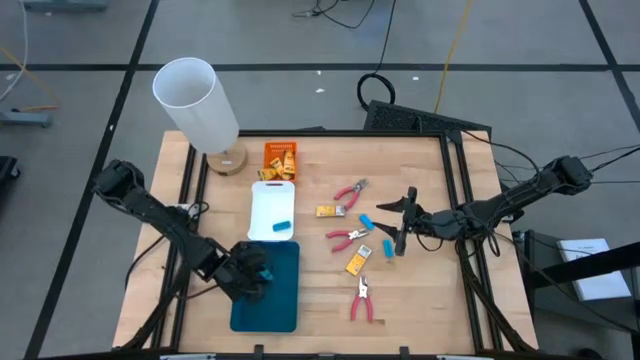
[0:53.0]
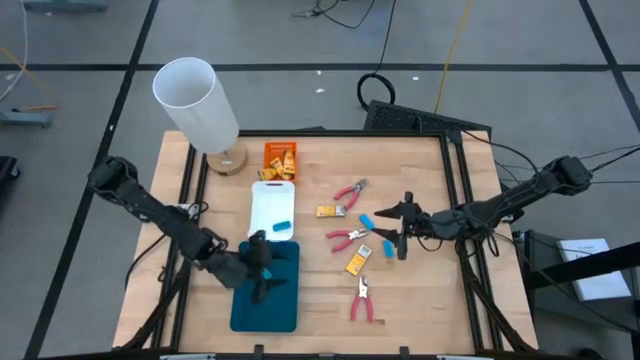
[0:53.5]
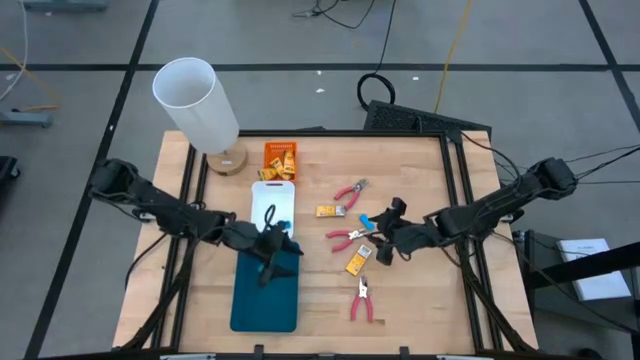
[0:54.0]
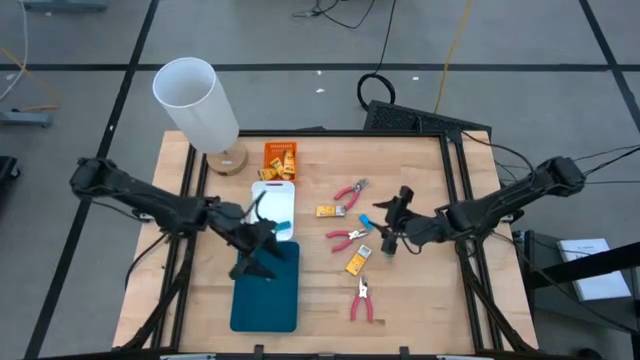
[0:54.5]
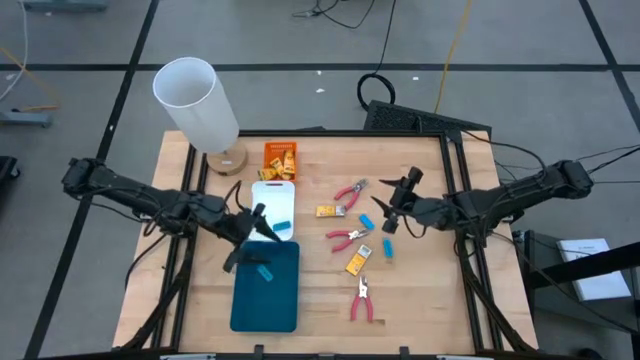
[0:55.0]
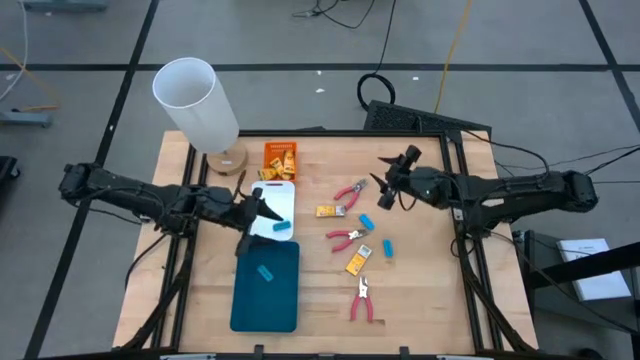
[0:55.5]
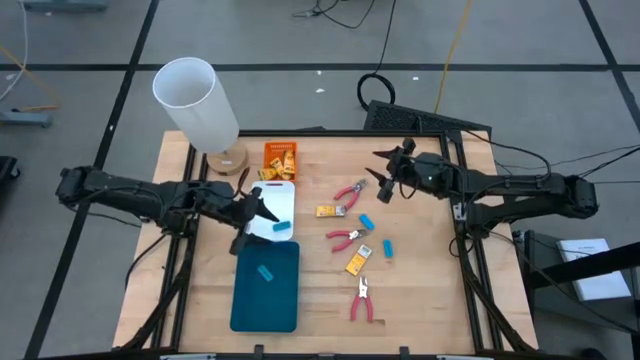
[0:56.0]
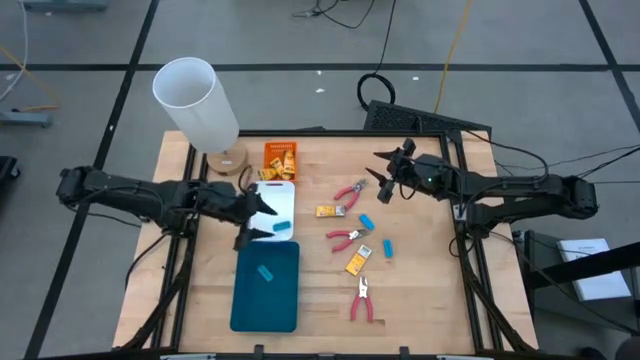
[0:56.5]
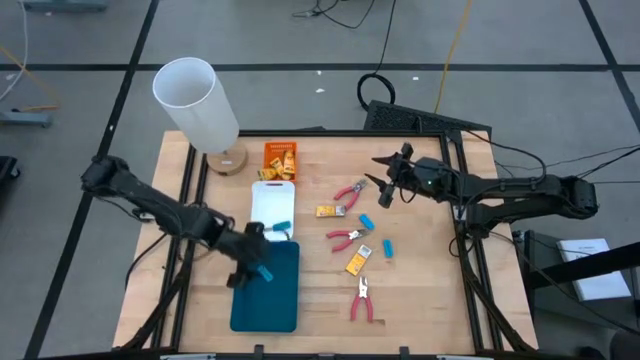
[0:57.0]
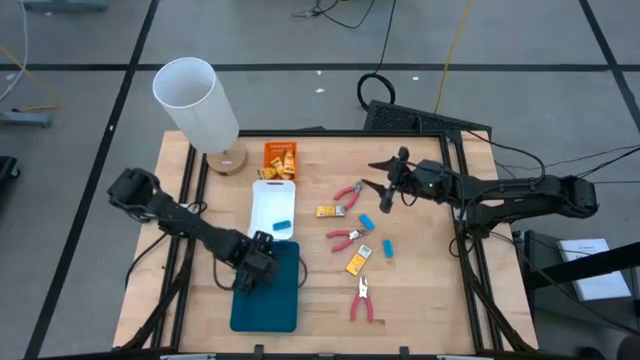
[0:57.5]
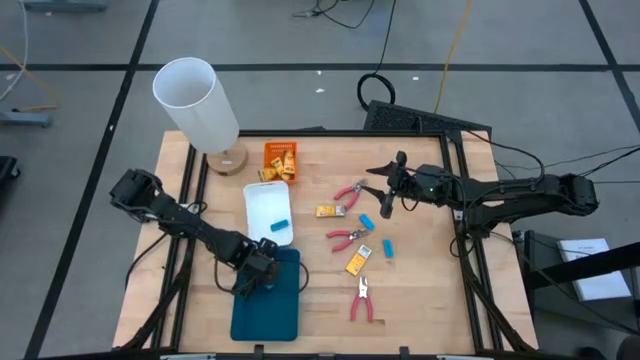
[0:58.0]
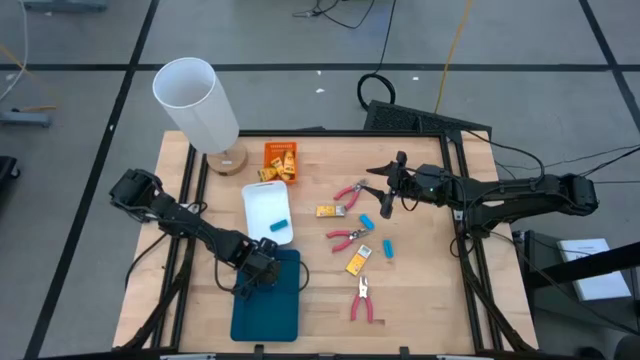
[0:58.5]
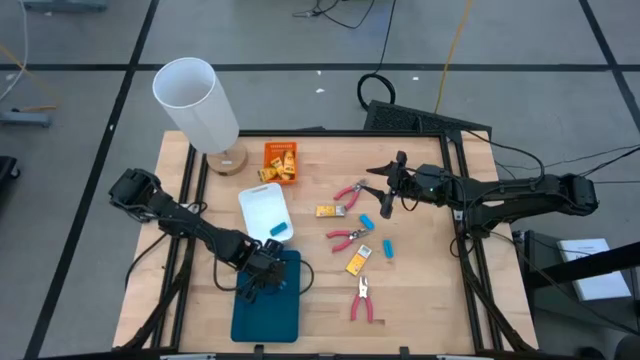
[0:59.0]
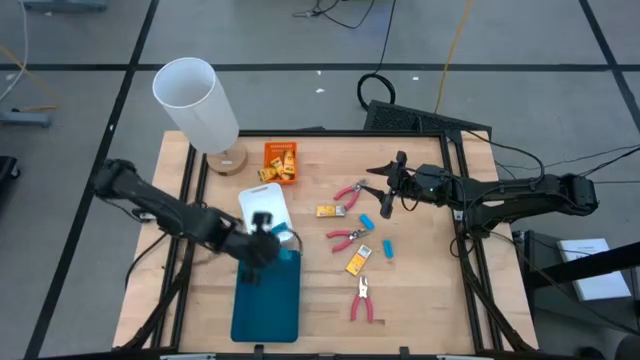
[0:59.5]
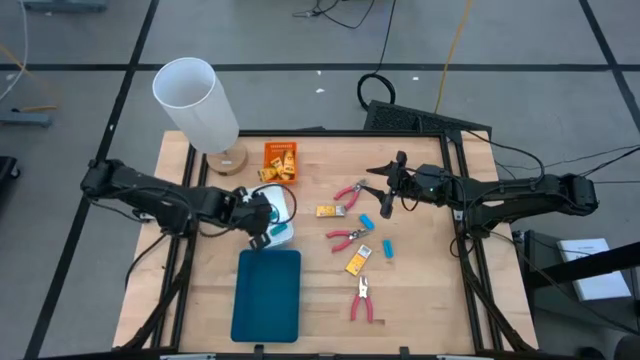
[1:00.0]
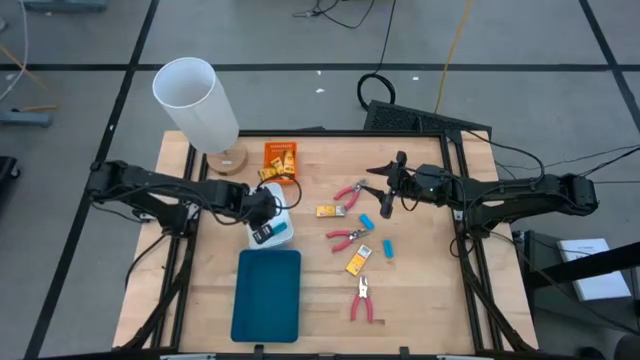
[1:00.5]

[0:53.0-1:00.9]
Task: Pick & Place School Supplies
Put the blue eraser into the white bin

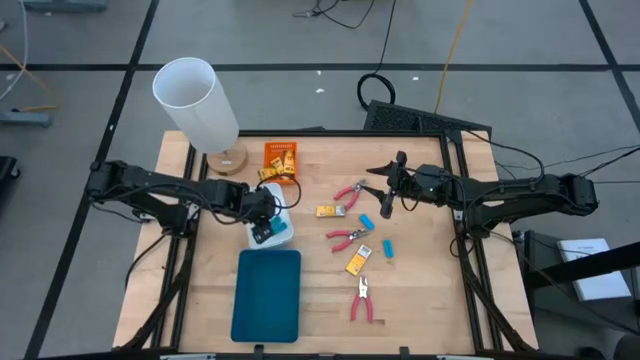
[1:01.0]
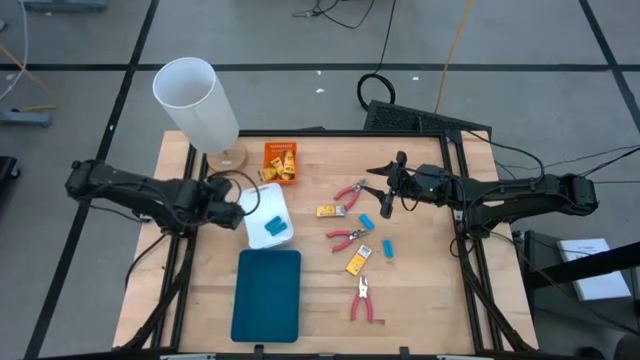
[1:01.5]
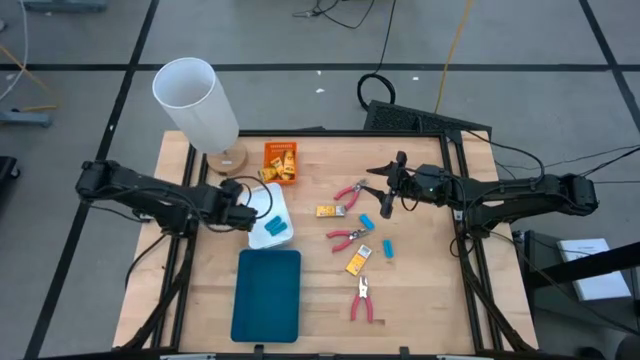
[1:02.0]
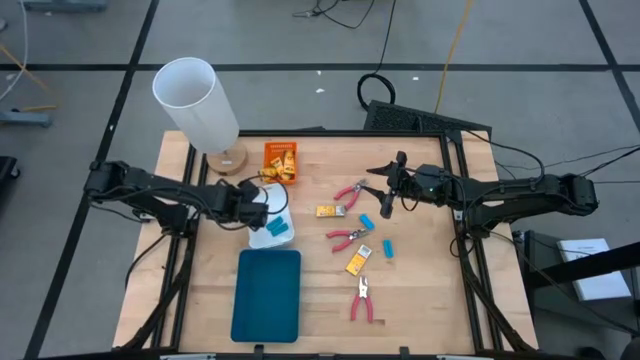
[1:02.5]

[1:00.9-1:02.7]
Adjust the white bin

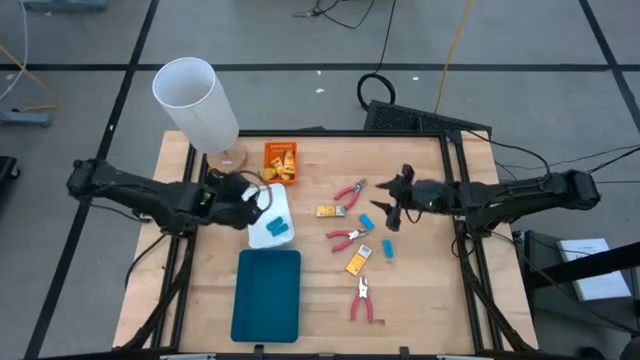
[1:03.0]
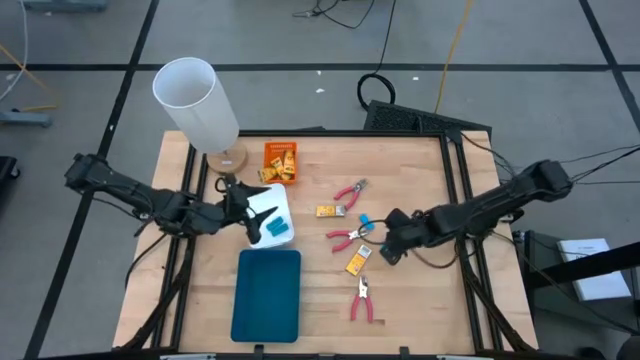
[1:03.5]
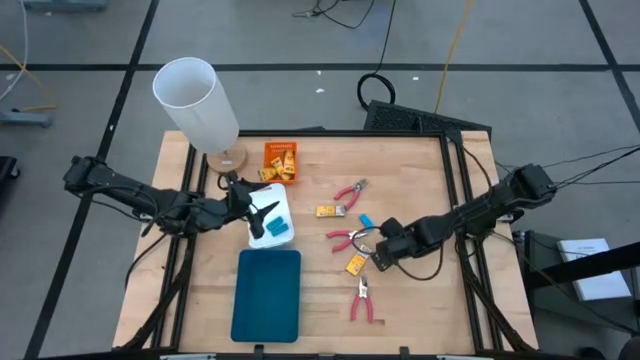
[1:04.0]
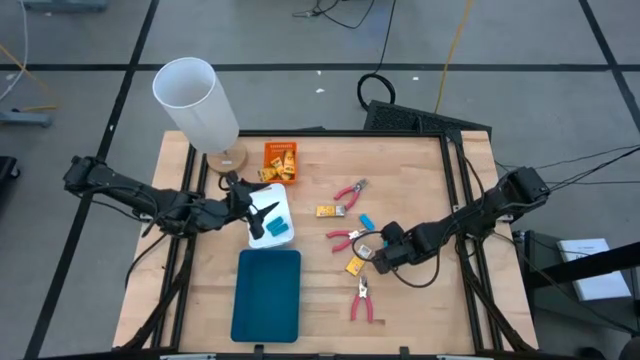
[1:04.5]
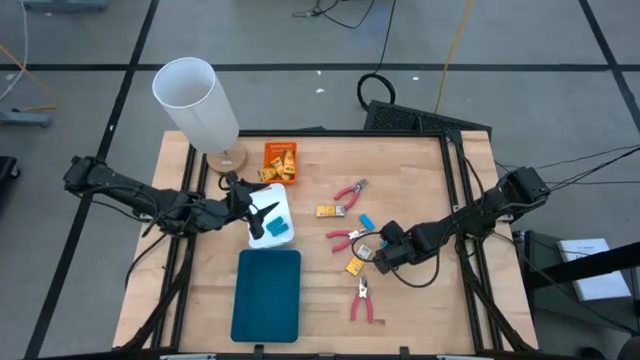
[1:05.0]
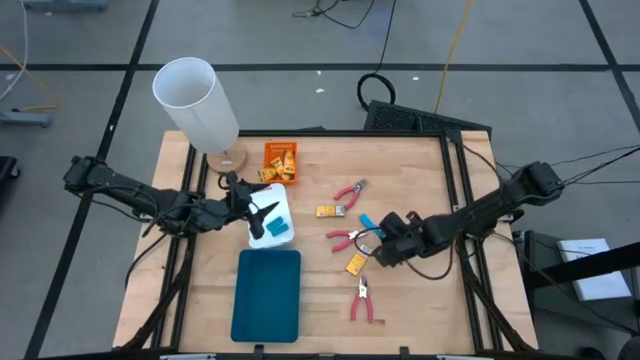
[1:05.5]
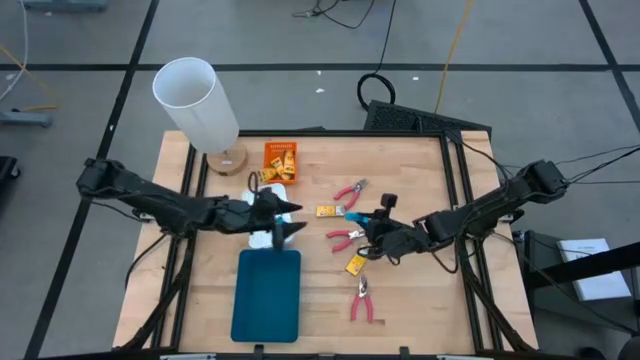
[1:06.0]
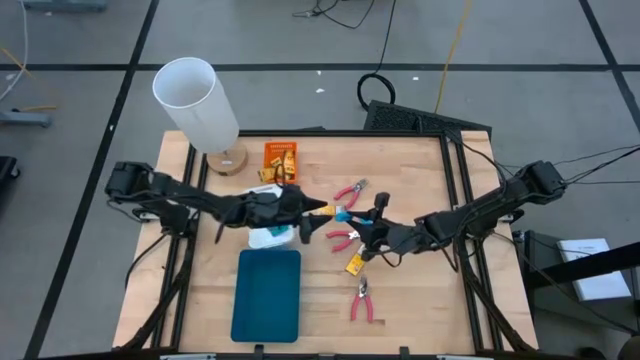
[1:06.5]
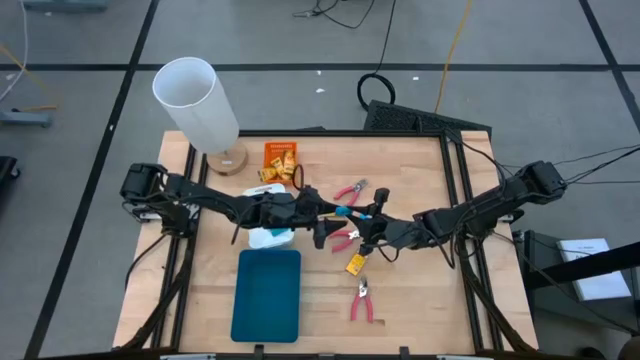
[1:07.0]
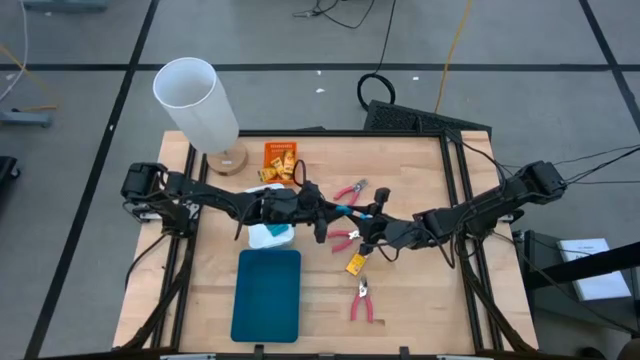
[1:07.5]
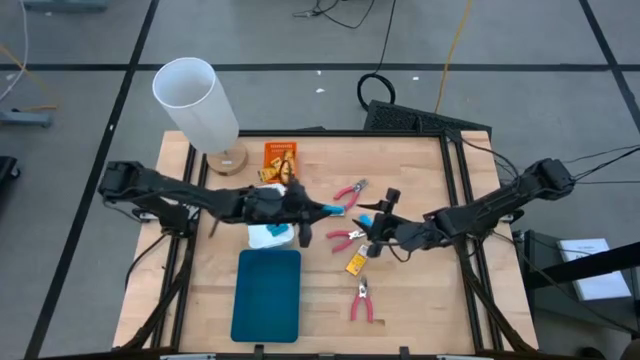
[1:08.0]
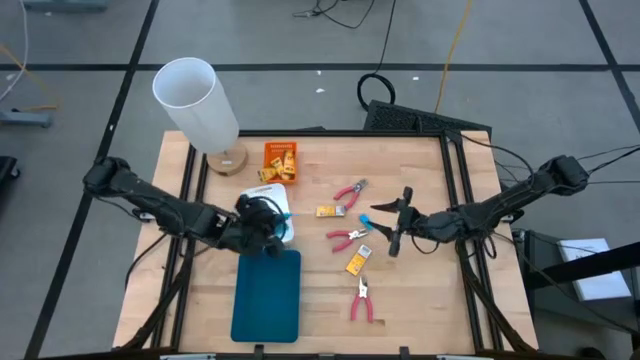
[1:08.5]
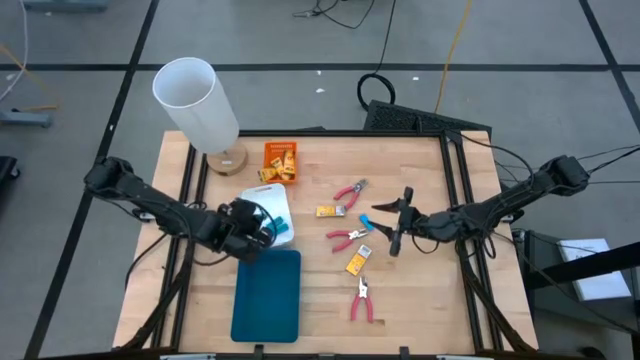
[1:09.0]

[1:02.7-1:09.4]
Put the blue eraser into the white bin

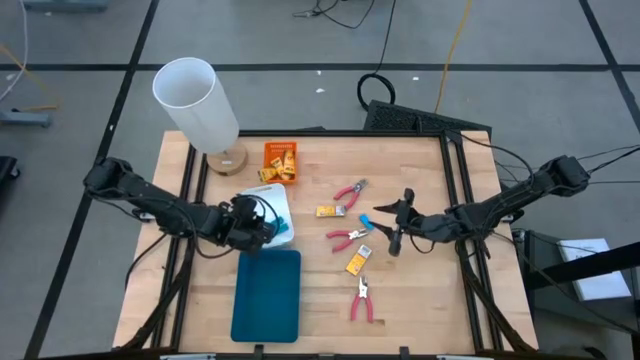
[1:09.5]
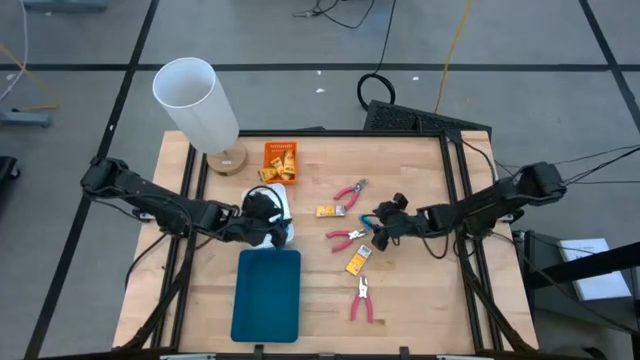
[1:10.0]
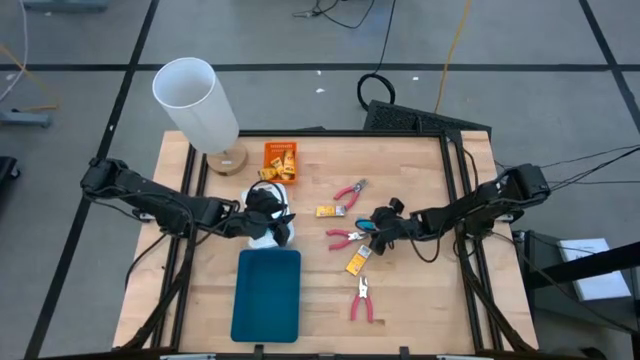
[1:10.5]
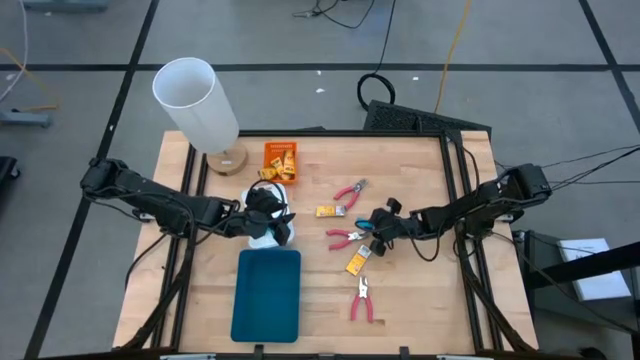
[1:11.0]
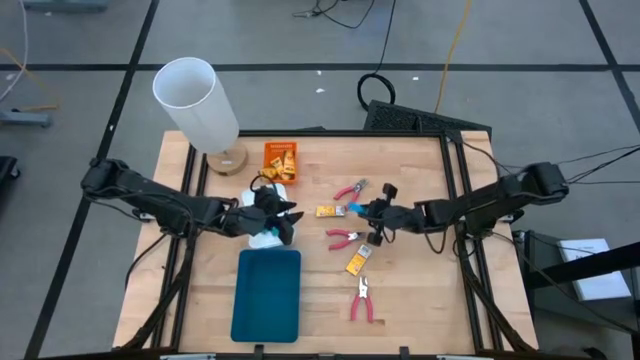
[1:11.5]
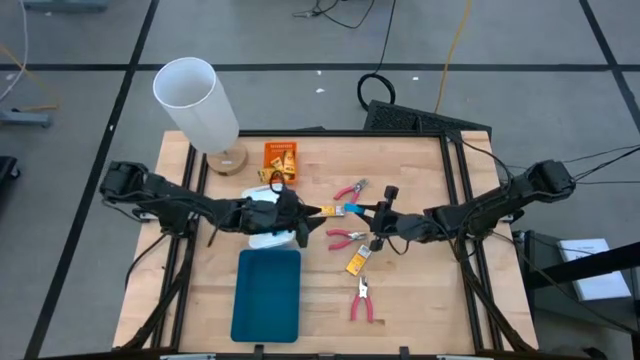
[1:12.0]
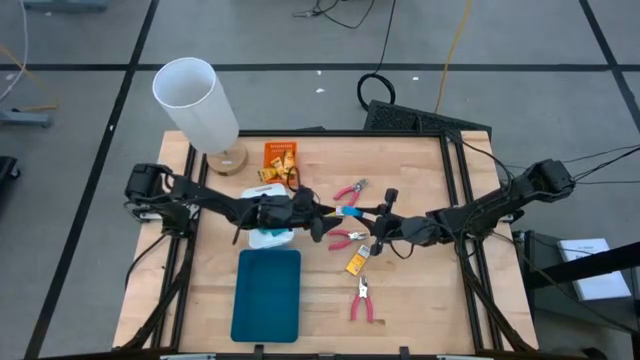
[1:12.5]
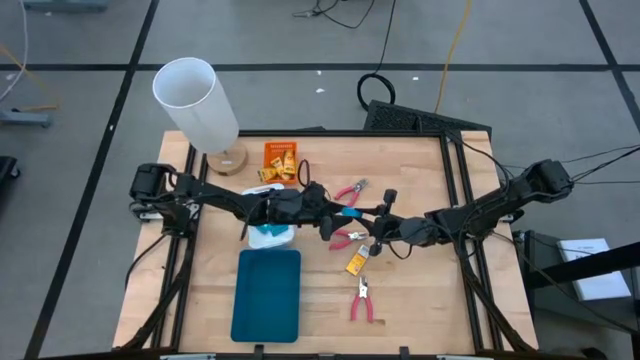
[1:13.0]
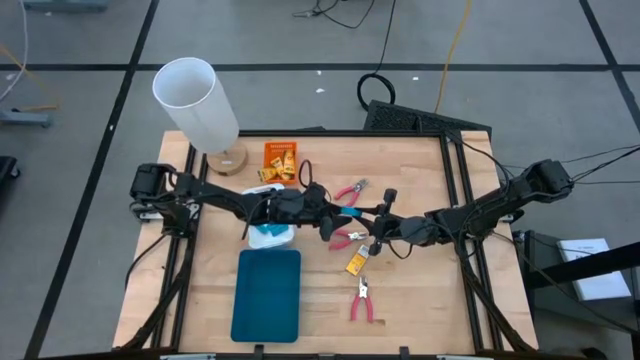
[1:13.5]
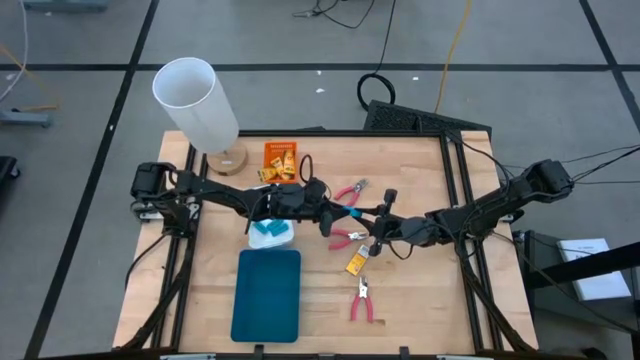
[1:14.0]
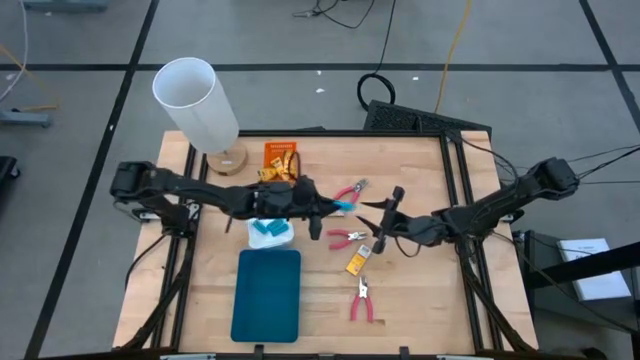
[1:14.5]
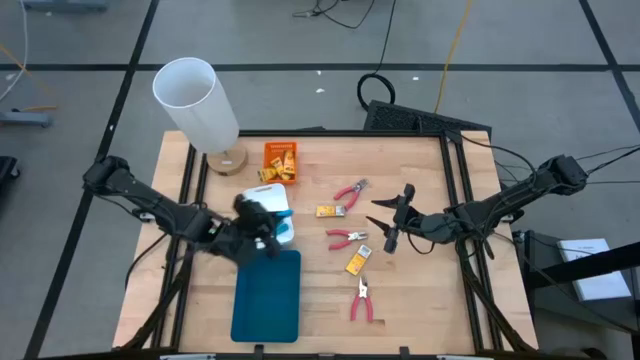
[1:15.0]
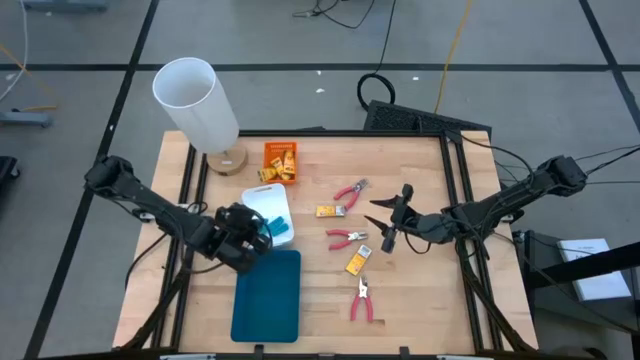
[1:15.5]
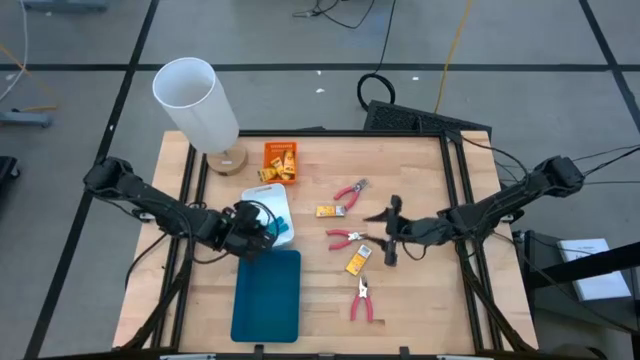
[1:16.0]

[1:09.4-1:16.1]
Put the blue eraser into the white bin
